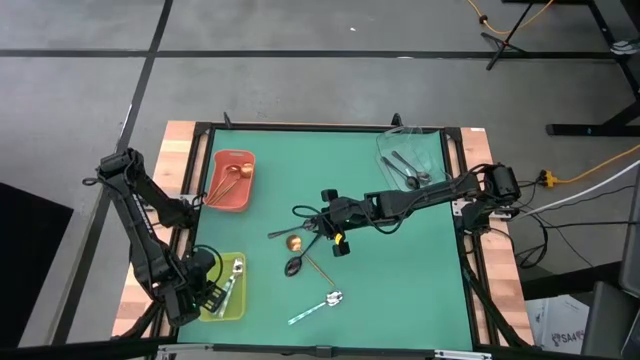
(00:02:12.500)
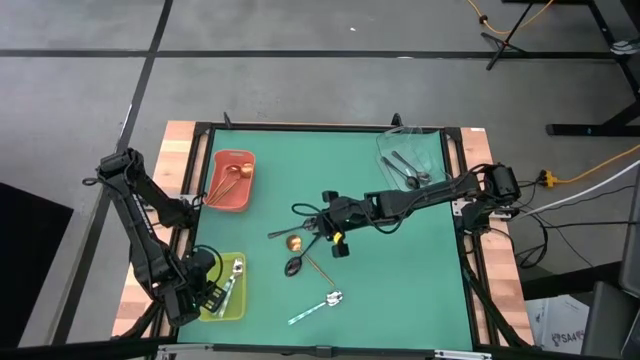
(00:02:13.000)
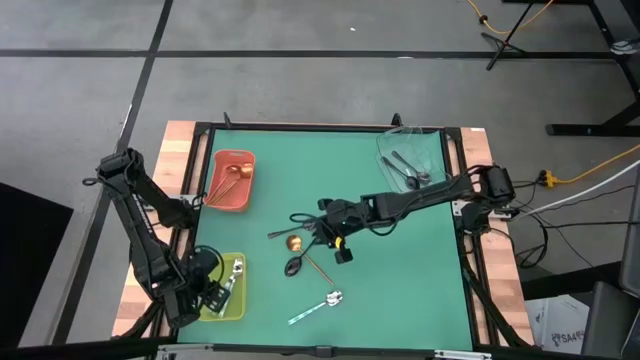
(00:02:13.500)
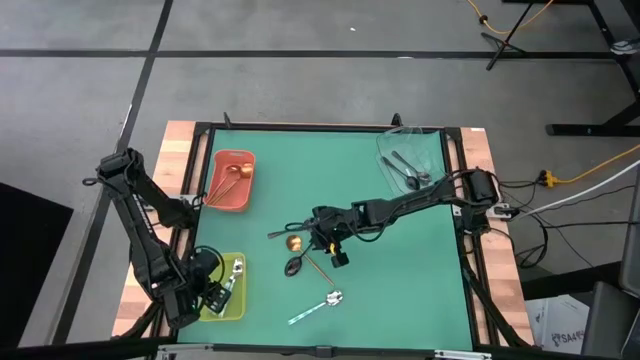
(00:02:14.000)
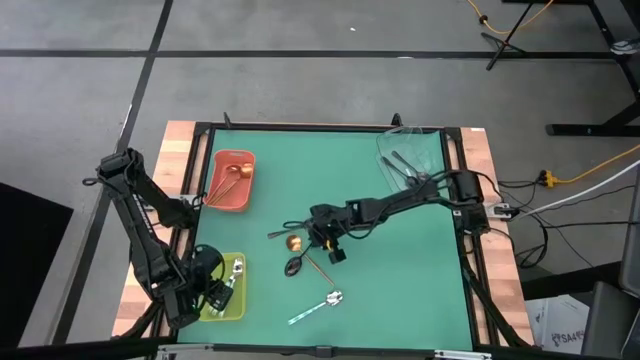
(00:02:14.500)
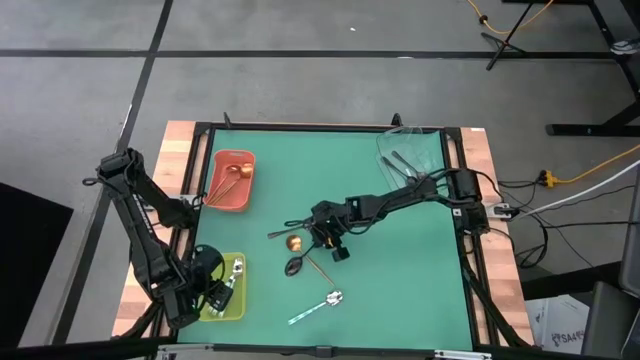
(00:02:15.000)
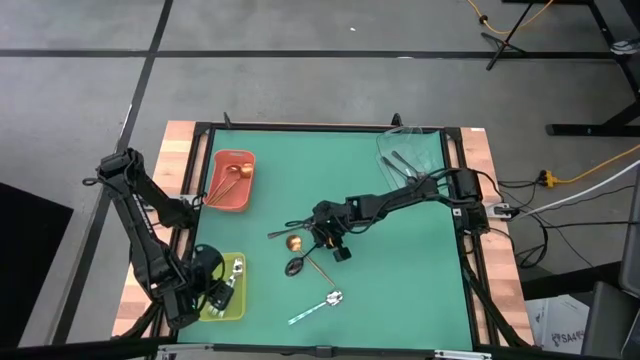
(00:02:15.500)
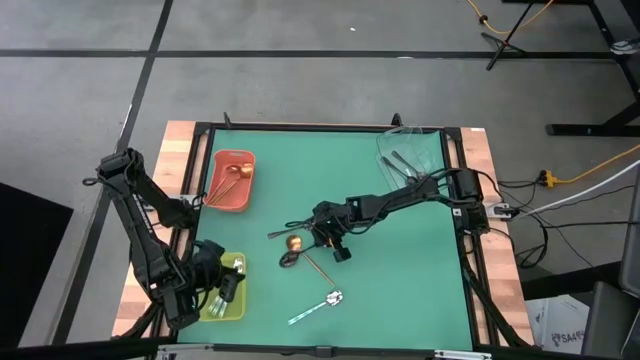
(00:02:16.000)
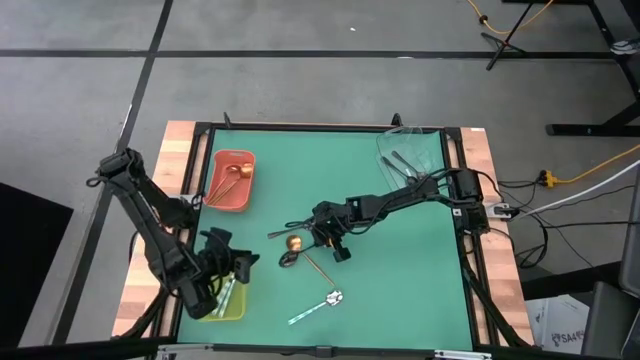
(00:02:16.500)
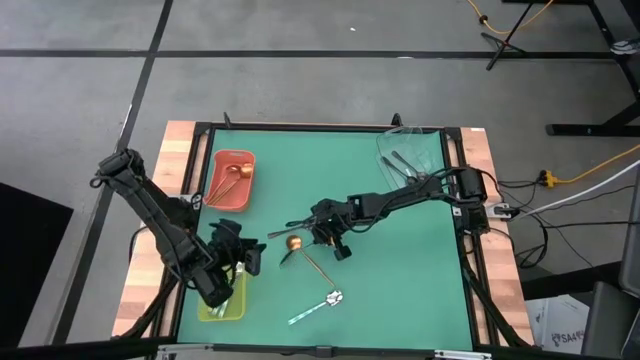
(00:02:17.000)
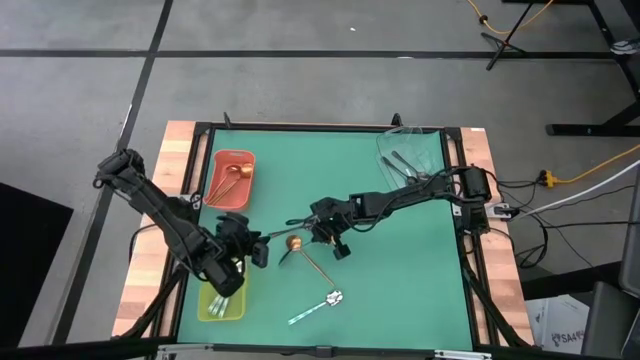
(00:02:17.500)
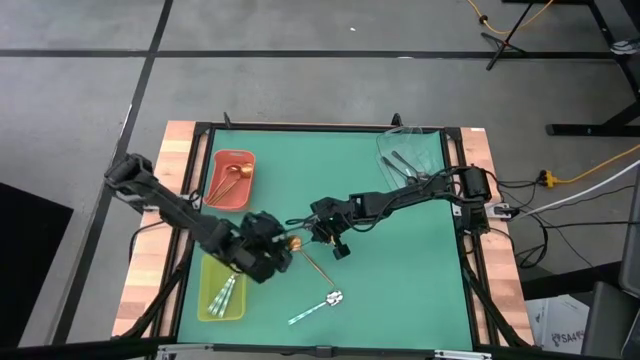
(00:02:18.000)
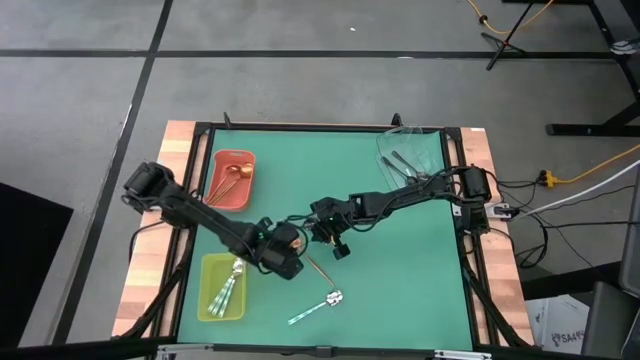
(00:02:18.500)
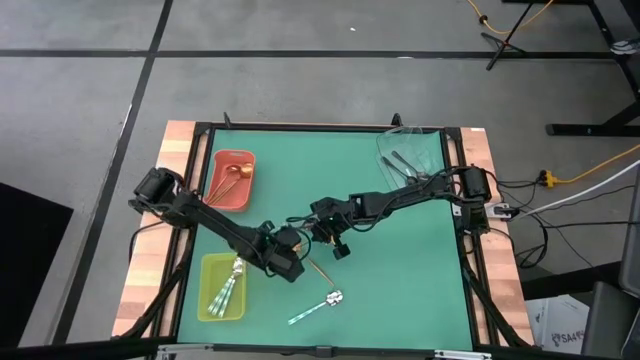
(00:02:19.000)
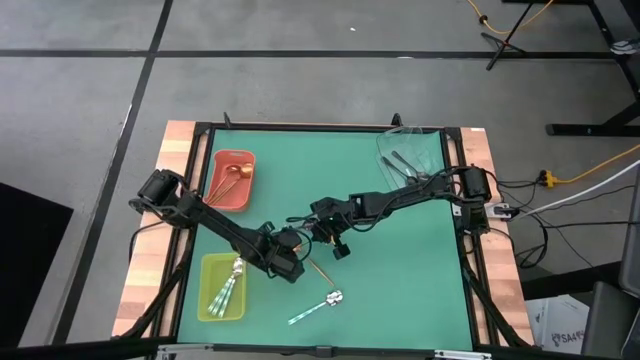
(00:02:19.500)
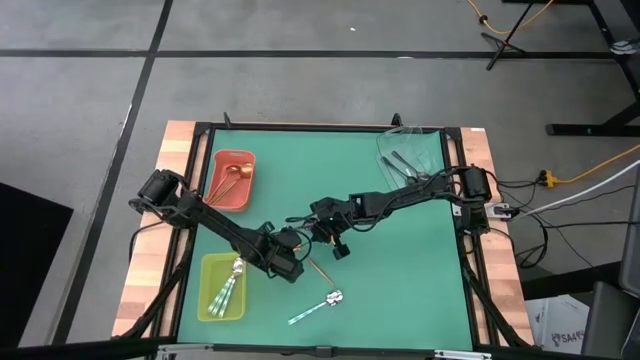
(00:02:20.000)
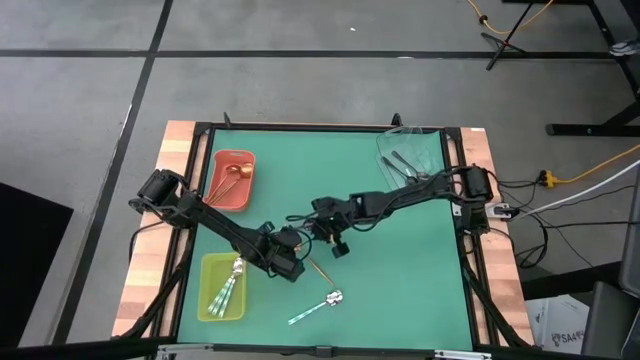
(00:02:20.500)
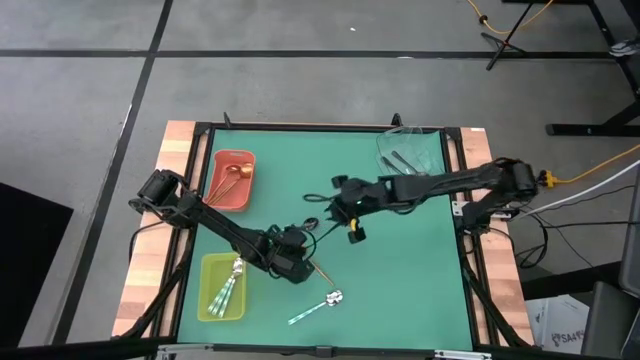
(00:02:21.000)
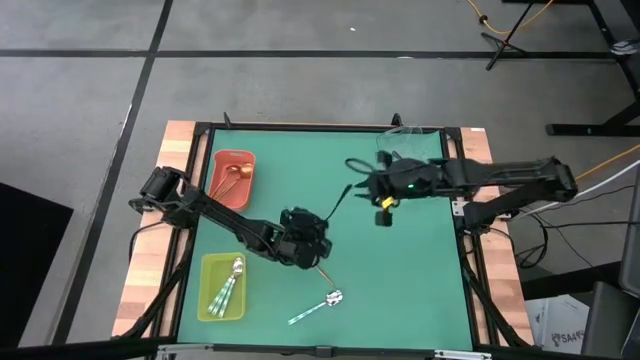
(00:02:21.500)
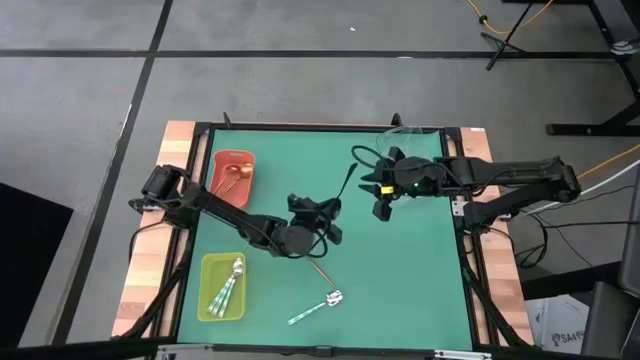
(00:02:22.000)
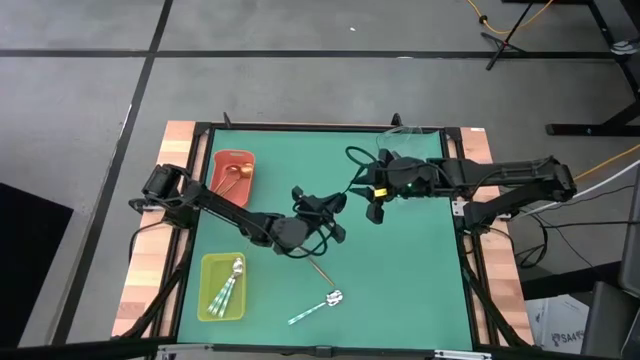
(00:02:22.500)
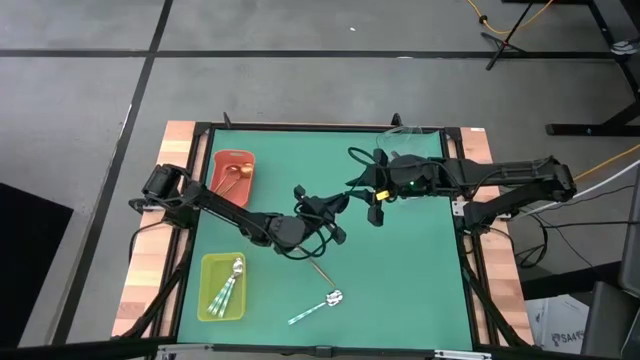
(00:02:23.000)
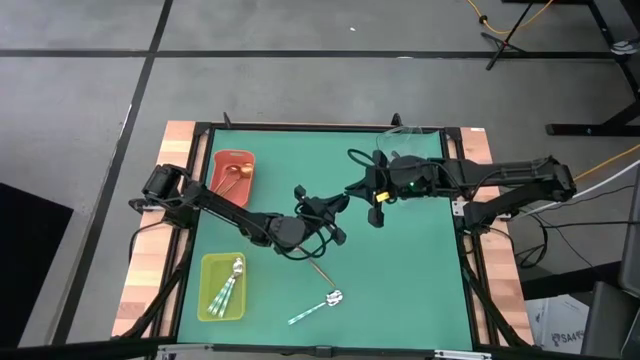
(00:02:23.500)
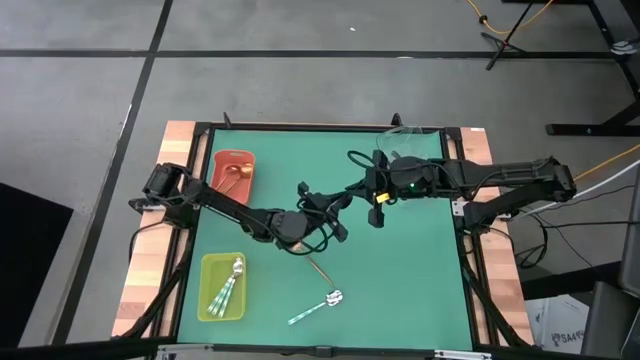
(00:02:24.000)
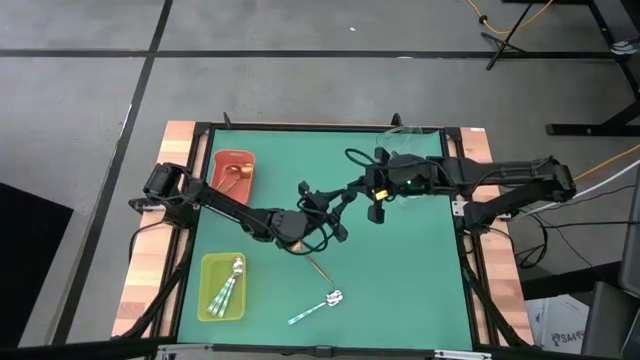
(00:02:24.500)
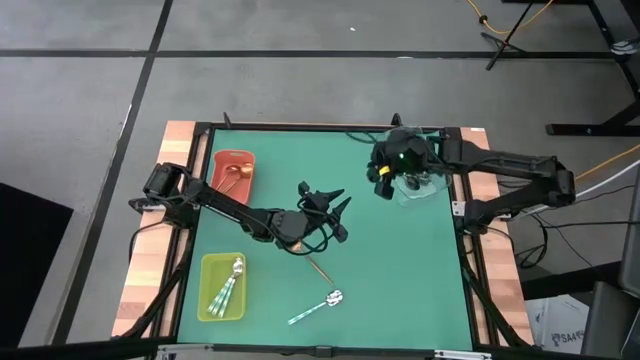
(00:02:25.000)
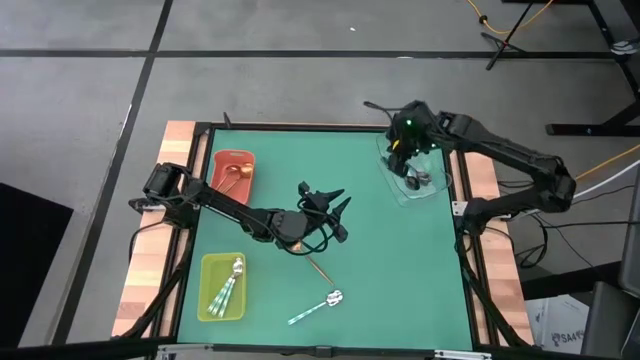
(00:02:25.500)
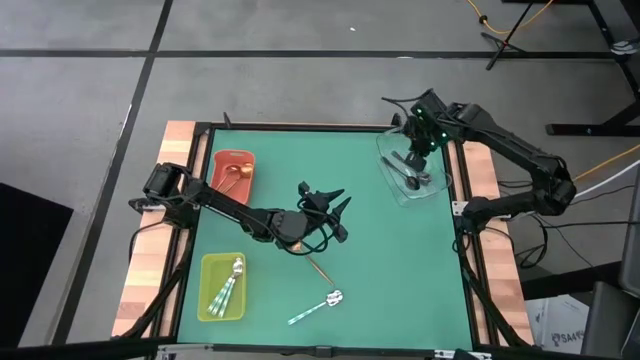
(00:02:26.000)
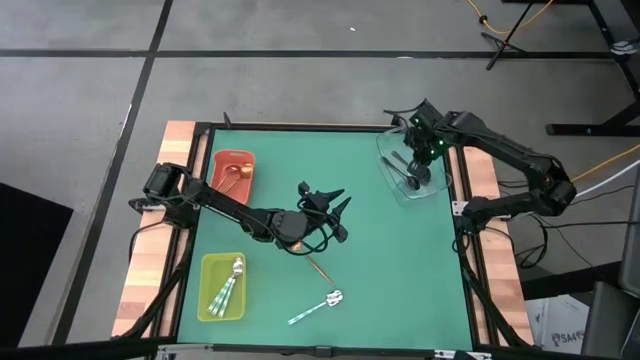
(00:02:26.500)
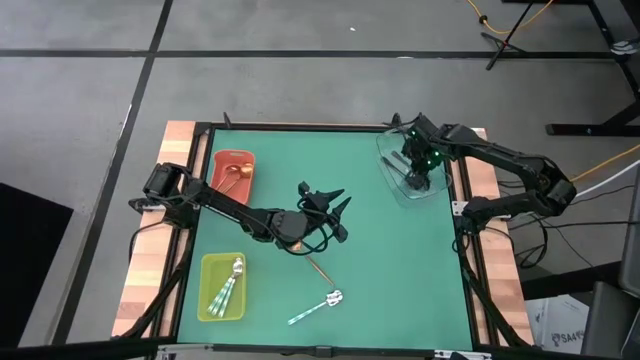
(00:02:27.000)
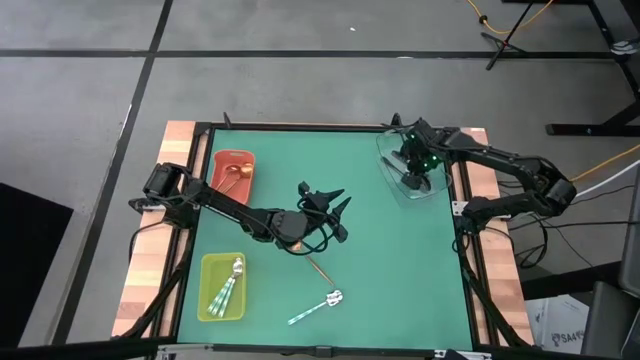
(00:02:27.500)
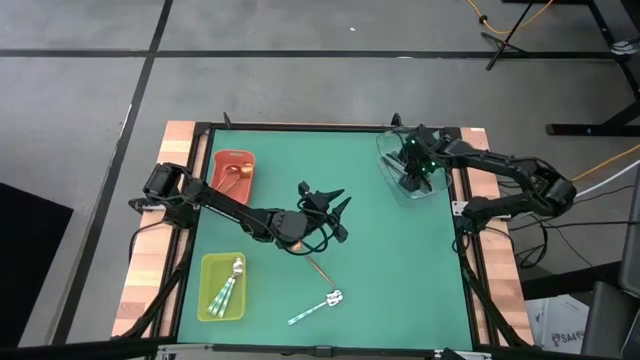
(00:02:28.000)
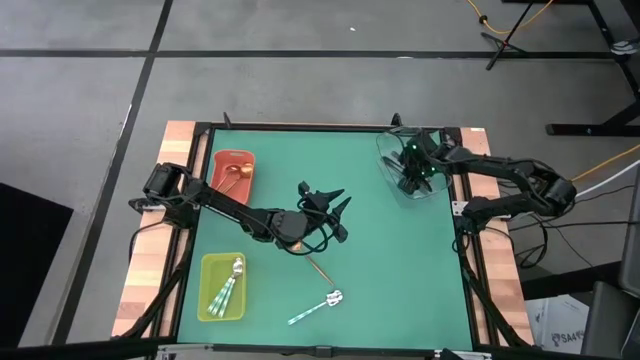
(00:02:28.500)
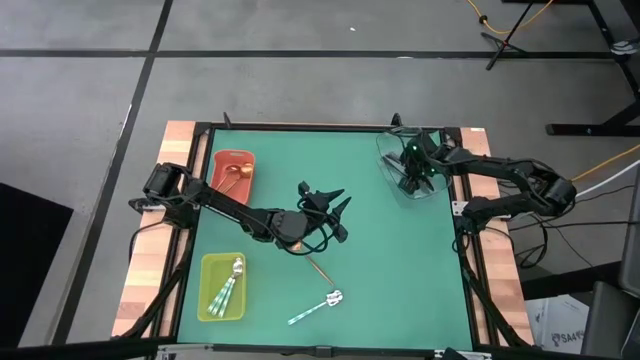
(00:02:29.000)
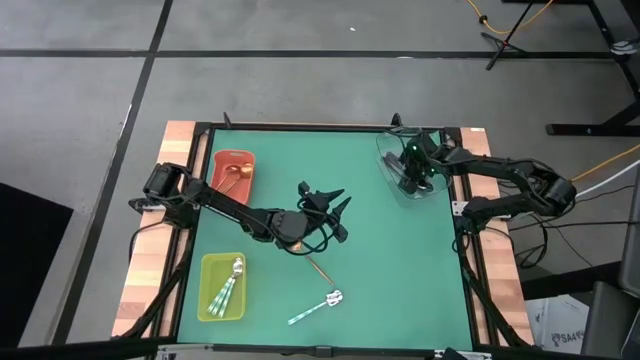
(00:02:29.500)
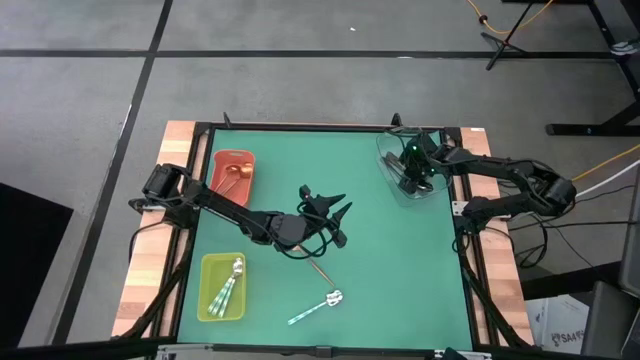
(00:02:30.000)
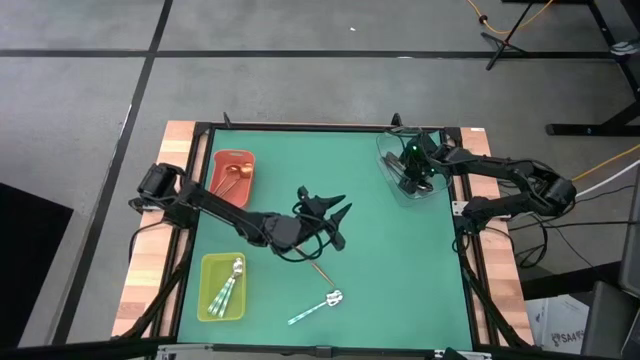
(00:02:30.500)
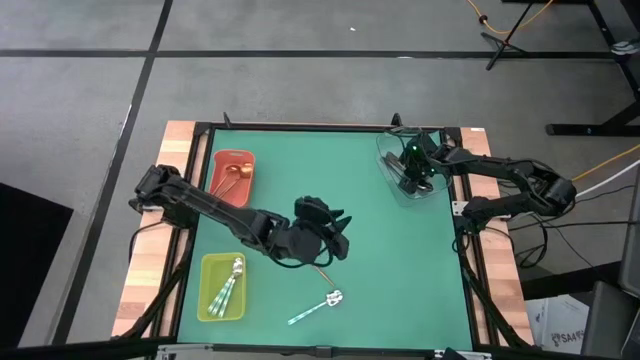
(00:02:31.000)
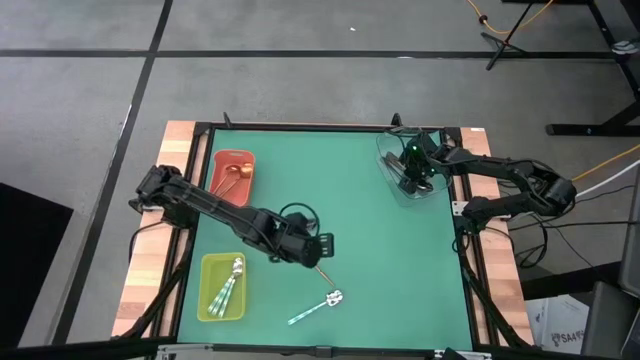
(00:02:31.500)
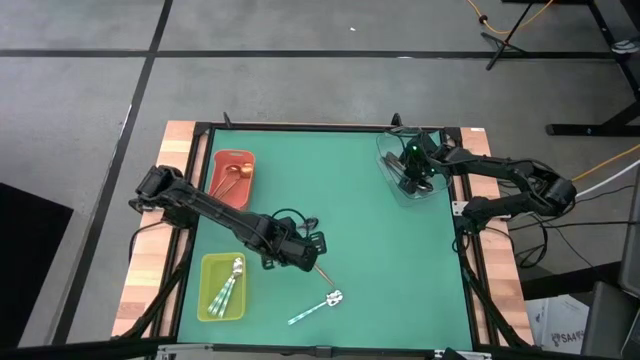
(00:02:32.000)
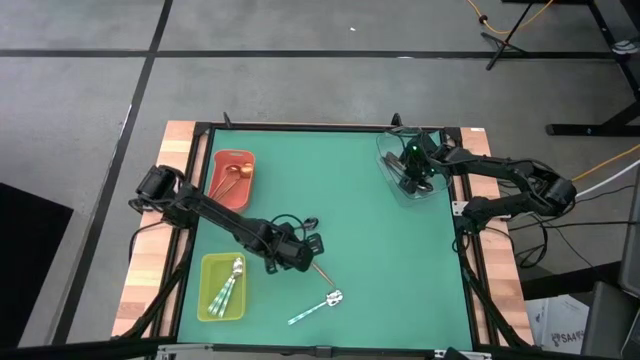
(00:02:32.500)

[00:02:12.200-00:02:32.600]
Task: Sort silverware by color (type)
Put the black spoon into the transparent bin

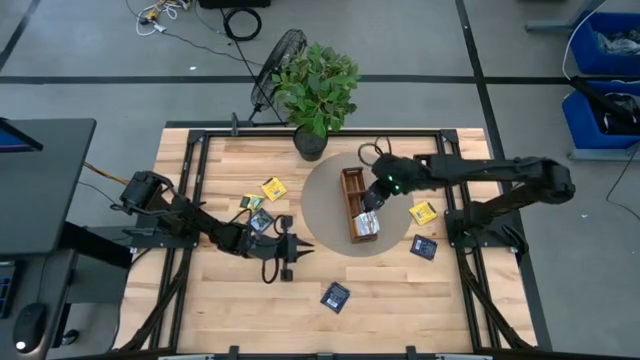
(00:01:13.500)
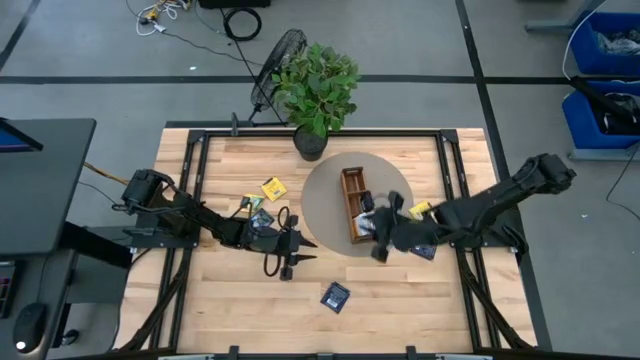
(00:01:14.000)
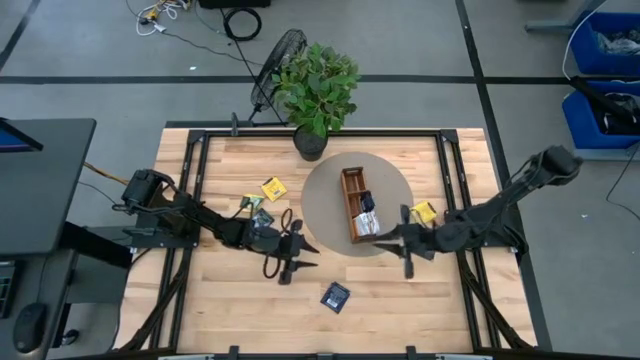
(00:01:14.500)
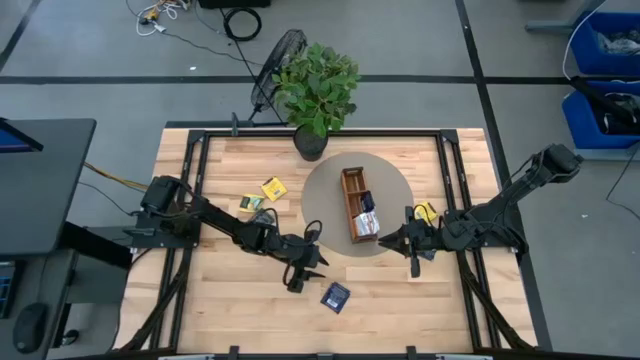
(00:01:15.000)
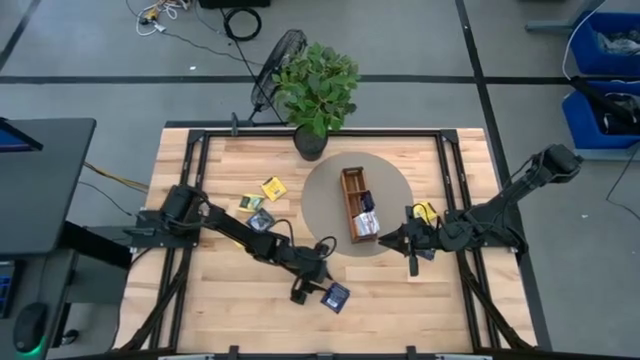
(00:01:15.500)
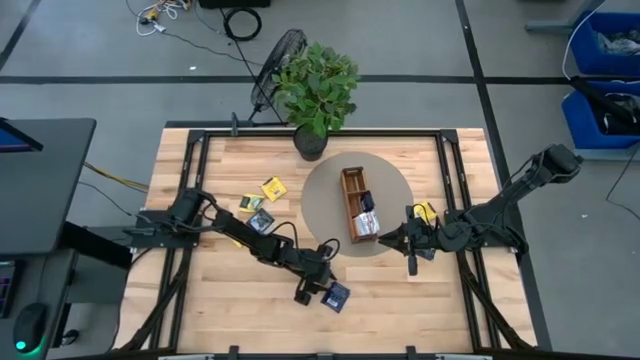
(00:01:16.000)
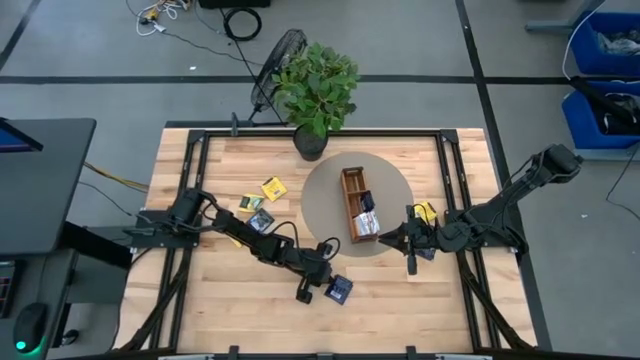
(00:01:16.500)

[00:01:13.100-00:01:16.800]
Task: Pick & Place Tea
Put the purple tea bag into the middle section of the wooden organizer
